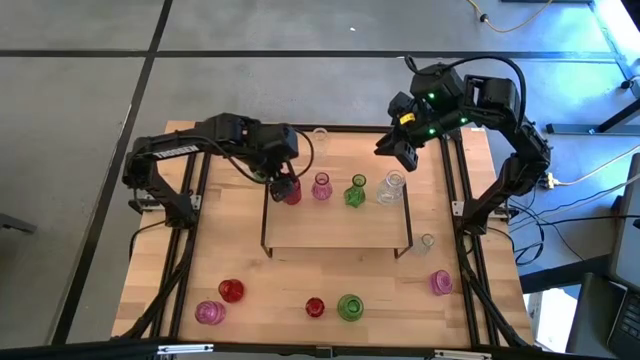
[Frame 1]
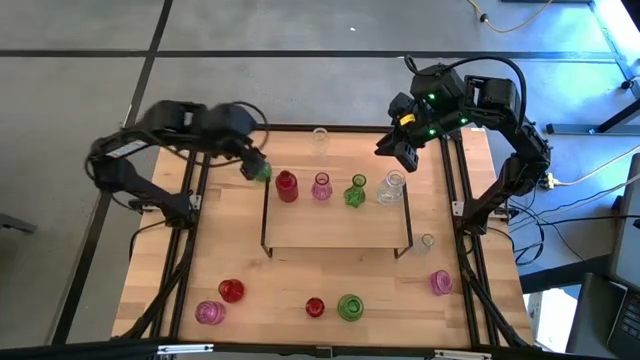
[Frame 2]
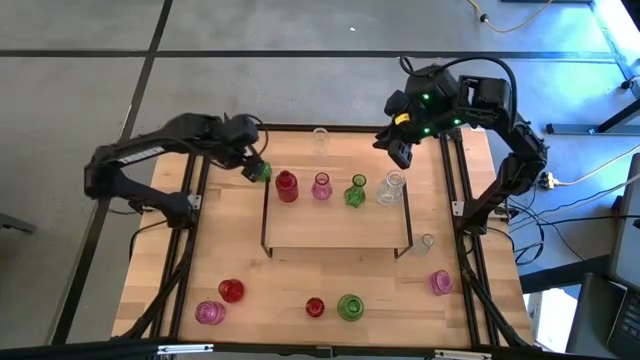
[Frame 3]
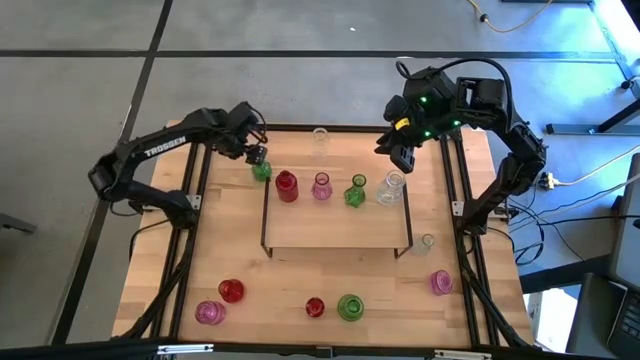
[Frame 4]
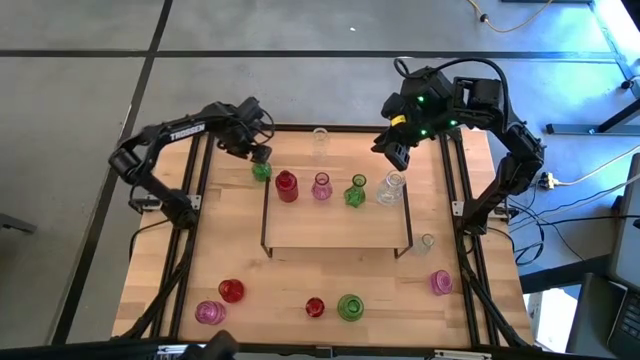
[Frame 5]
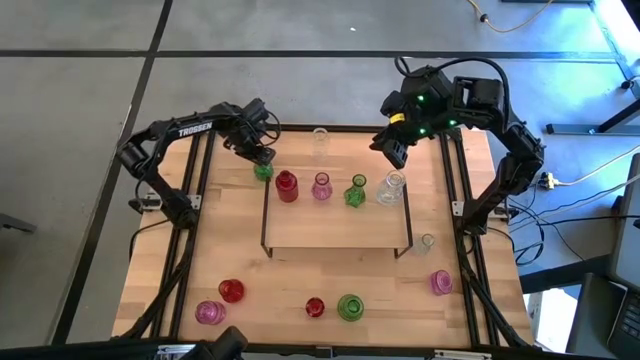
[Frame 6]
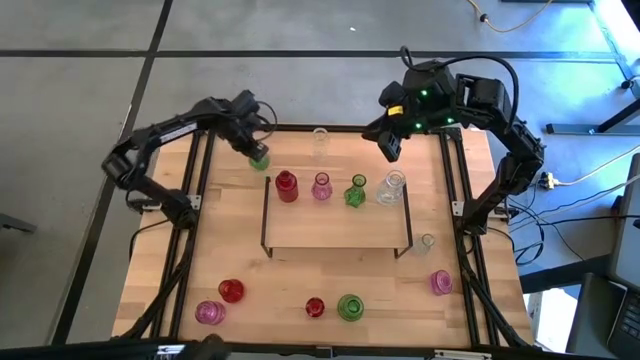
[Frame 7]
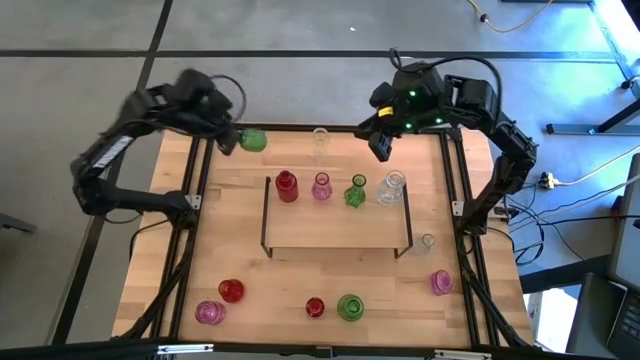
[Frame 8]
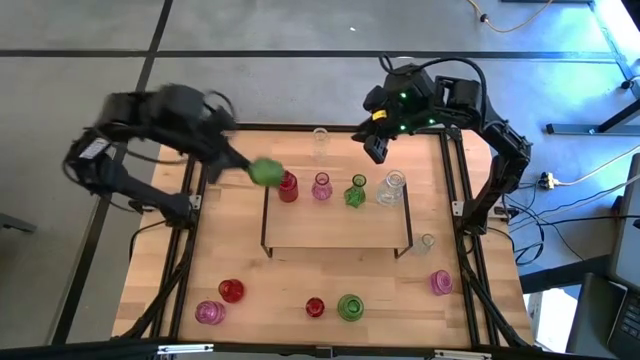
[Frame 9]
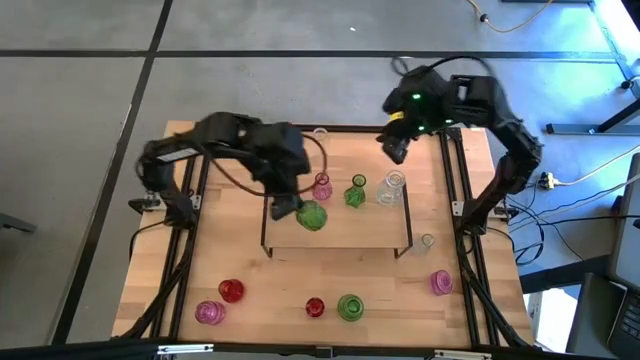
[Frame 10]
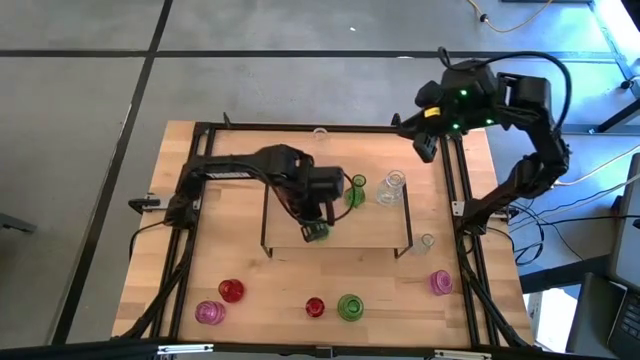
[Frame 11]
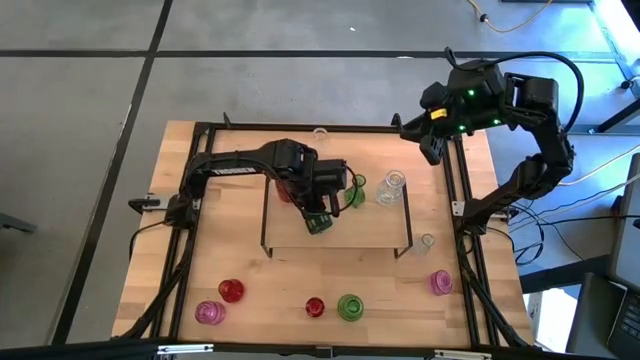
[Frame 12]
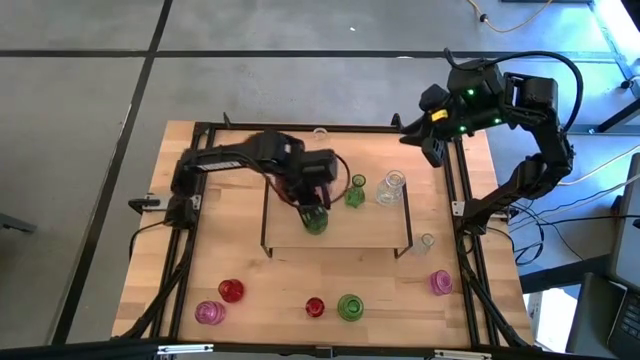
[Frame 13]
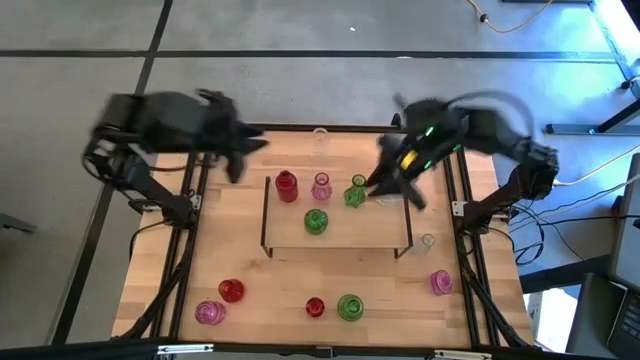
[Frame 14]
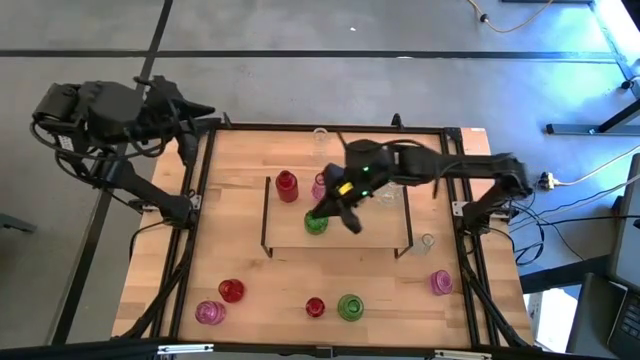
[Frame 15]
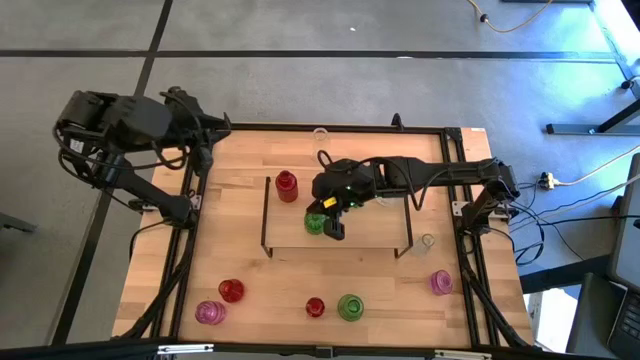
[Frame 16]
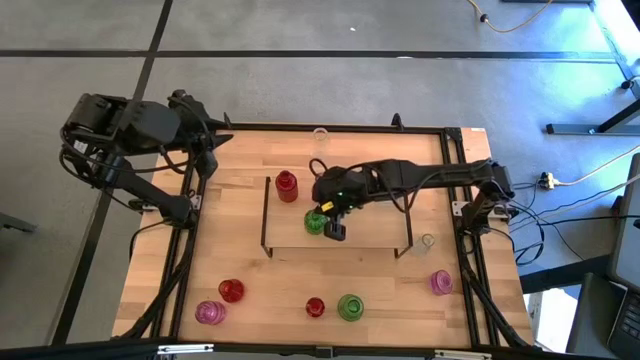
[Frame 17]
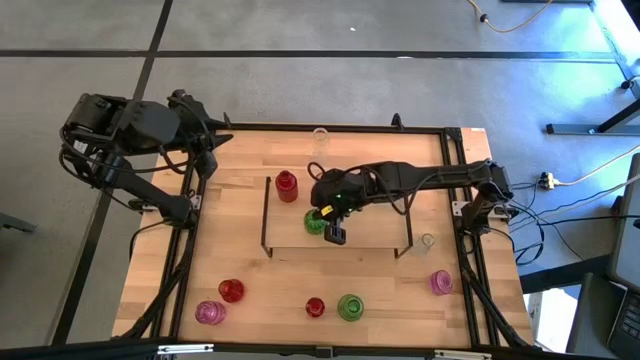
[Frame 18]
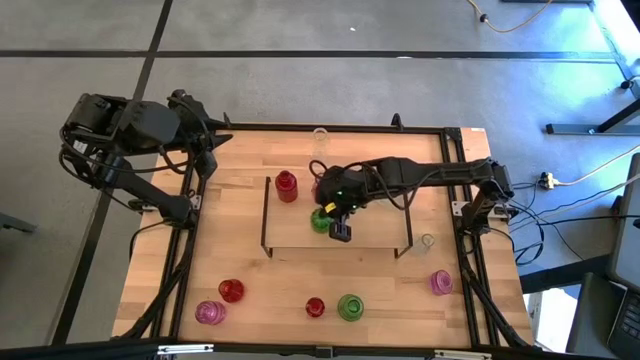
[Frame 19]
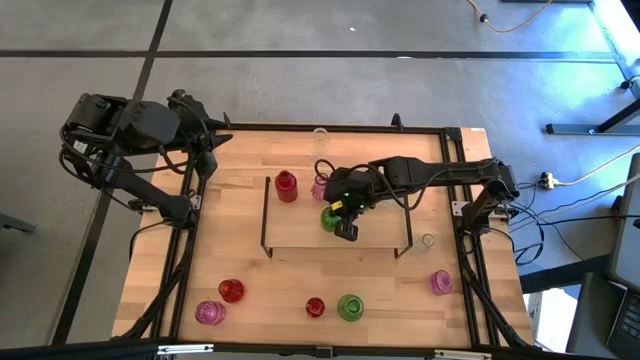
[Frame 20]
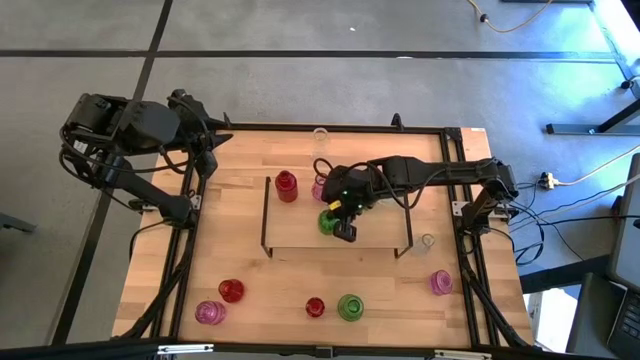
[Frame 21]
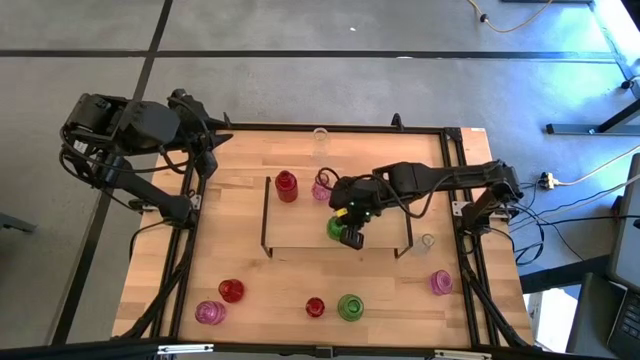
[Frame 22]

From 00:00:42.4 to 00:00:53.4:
Task: sort vases onto shelf
Put the top green vase on the shelf

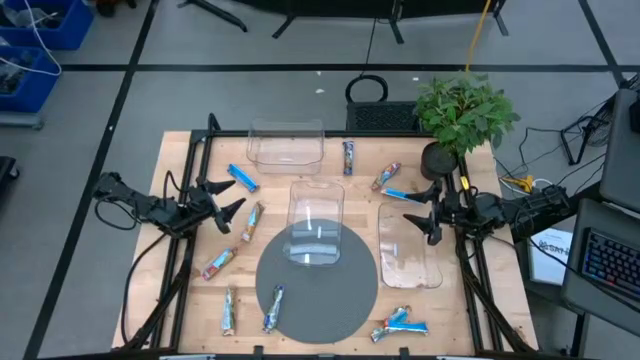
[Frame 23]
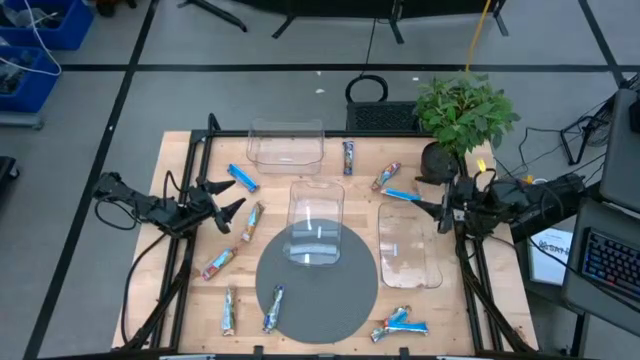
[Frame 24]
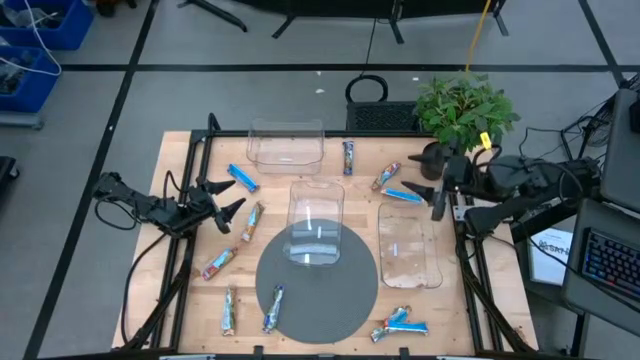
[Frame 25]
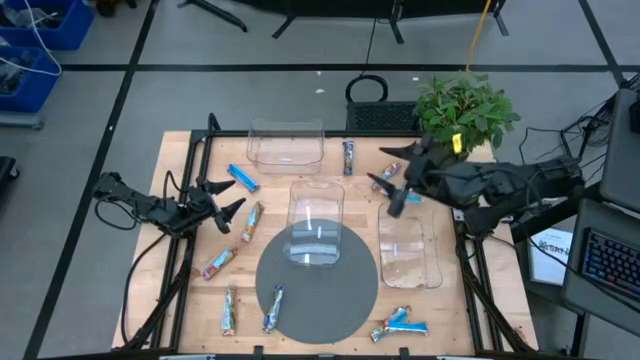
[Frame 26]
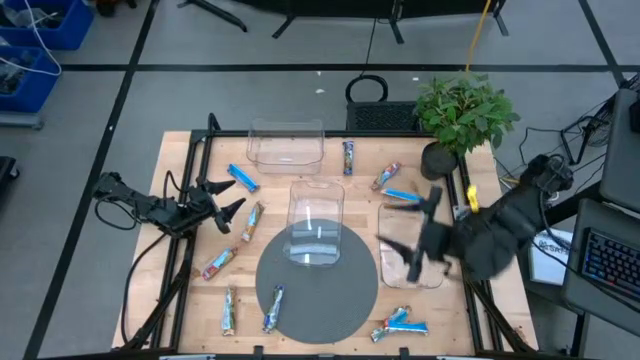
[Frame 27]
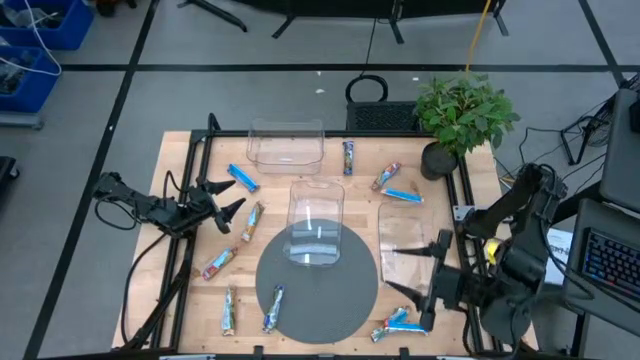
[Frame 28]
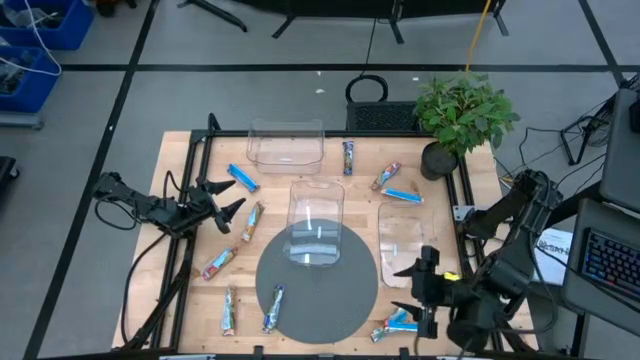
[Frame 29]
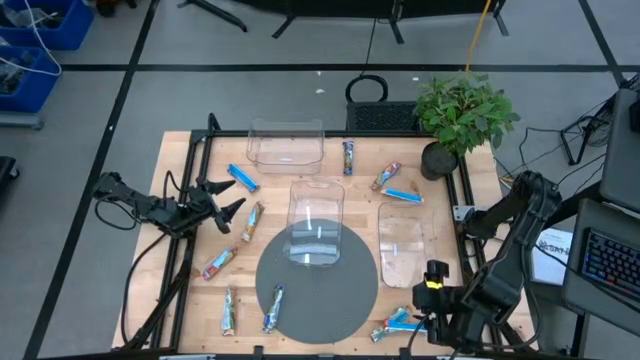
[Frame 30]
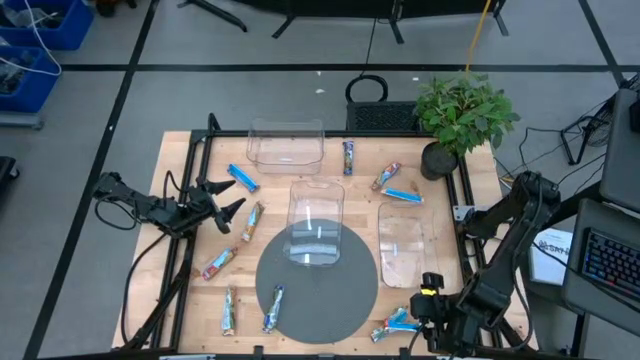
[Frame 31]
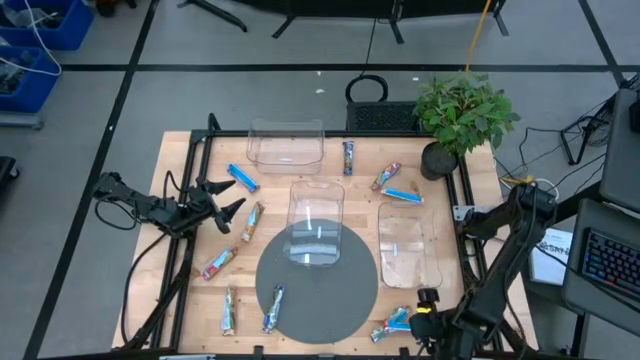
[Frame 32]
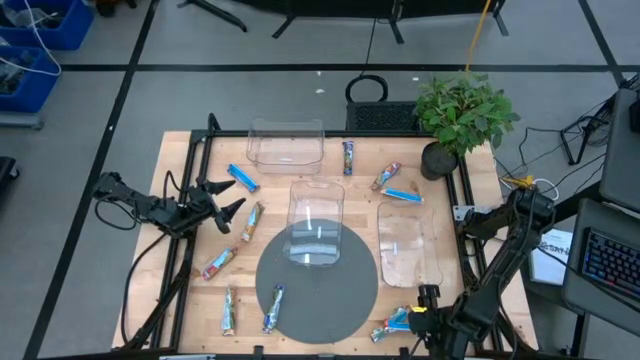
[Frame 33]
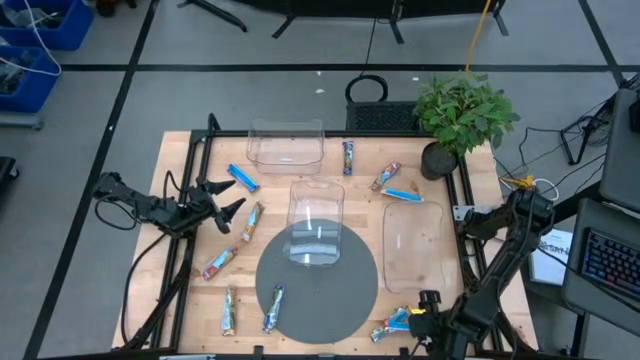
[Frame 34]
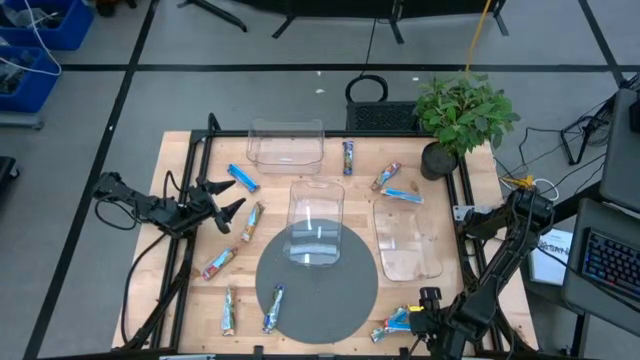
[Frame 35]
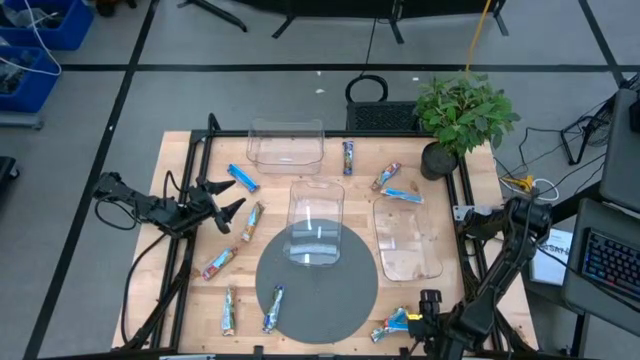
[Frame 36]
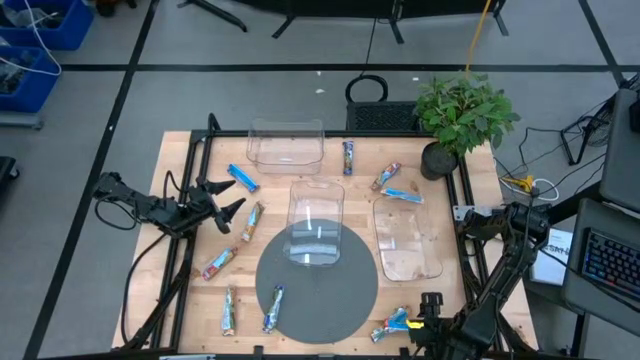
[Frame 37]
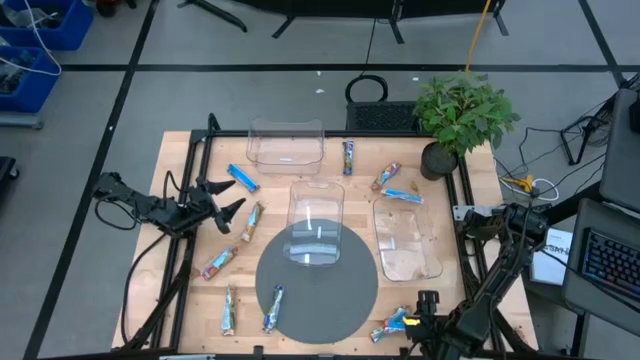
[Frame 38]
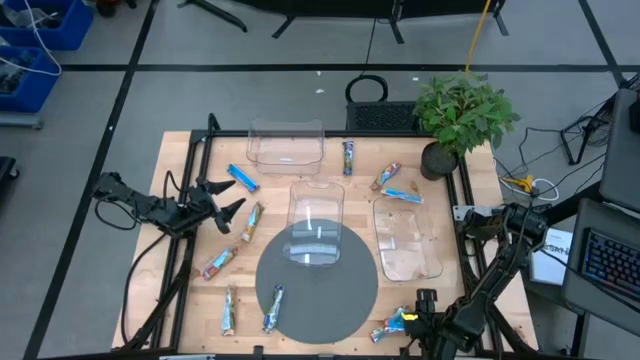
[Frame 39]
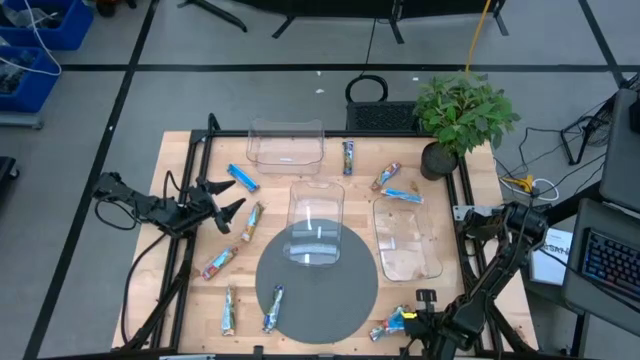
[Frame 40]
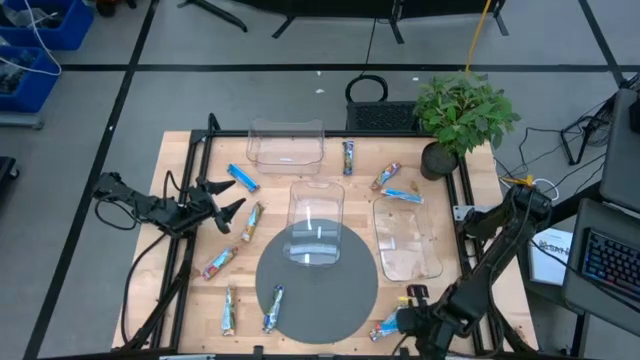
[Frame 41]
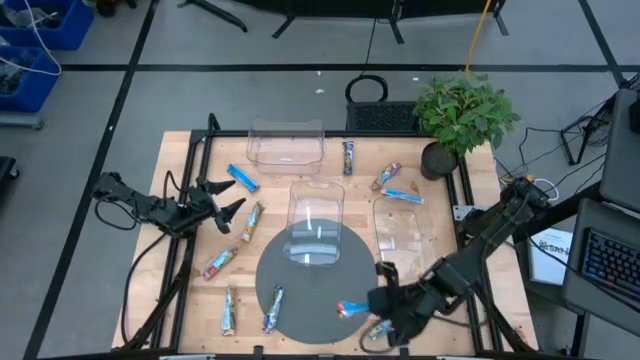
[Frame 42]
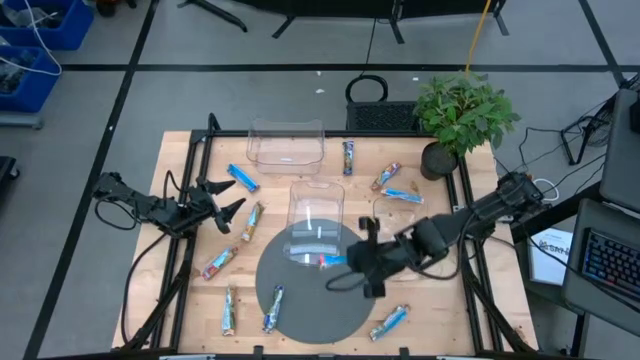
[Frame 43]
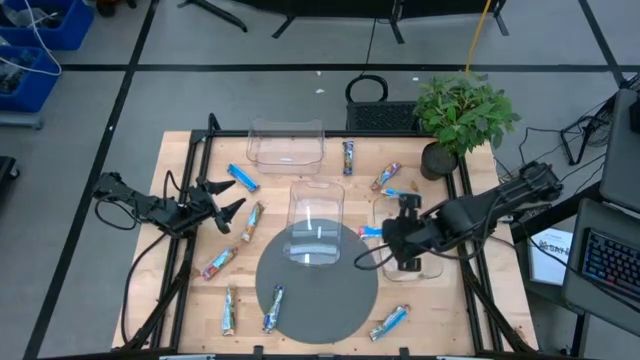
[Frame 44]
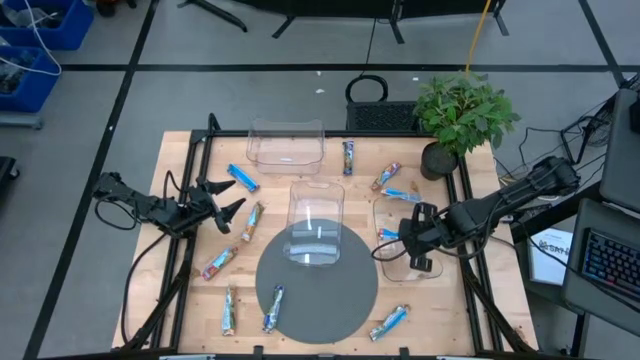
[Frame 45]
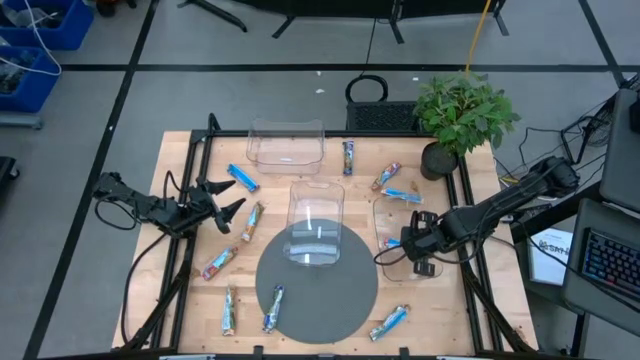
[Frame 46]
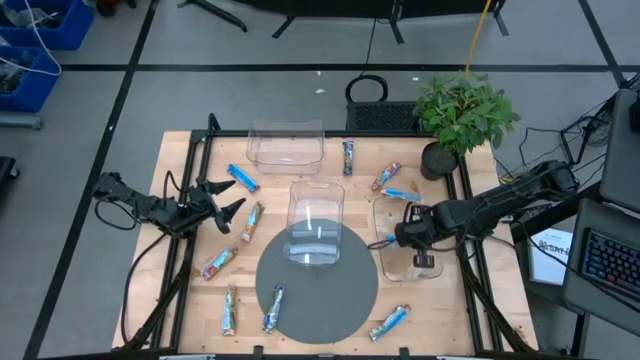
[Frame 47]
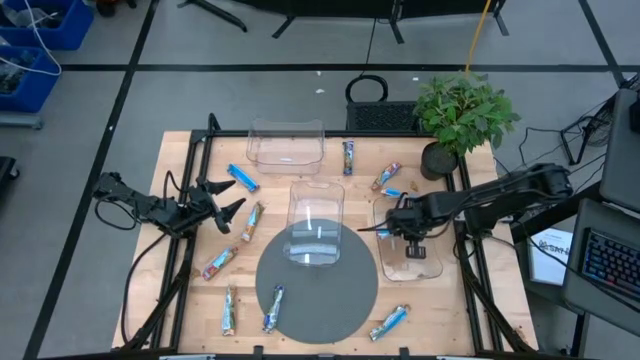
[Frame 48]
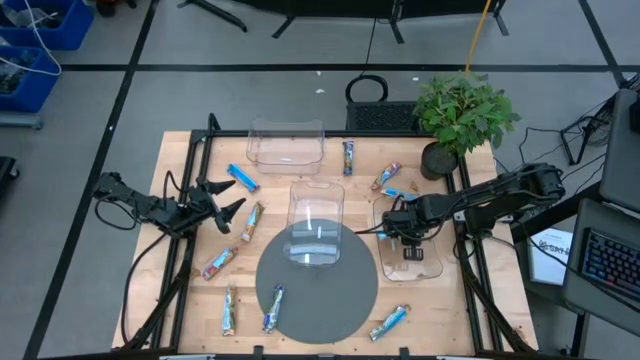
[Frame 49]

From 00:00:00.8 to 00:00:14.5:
Task: Pick and place Granola Bars by type
Put the red granola bar into the bottom right transparent bin
